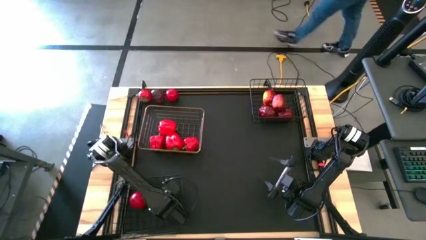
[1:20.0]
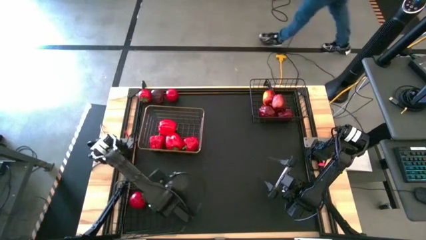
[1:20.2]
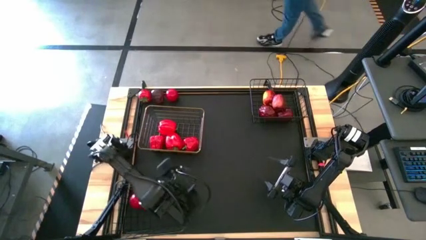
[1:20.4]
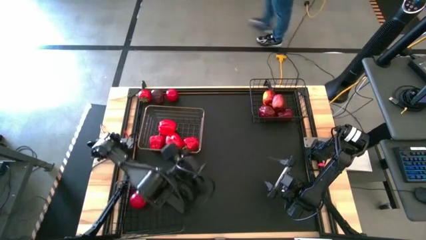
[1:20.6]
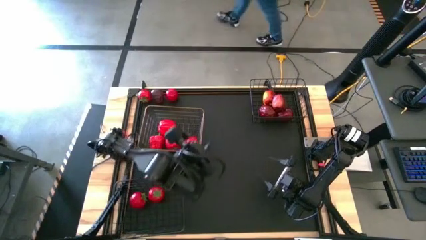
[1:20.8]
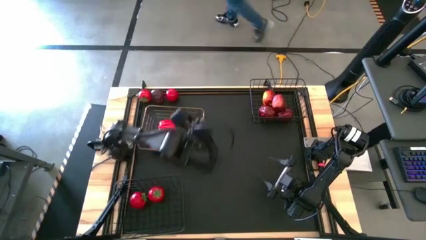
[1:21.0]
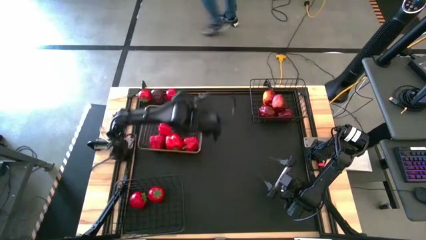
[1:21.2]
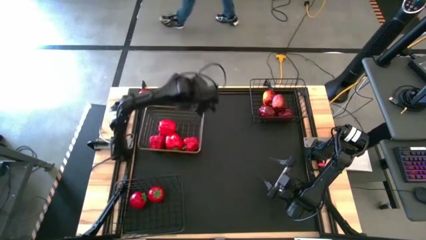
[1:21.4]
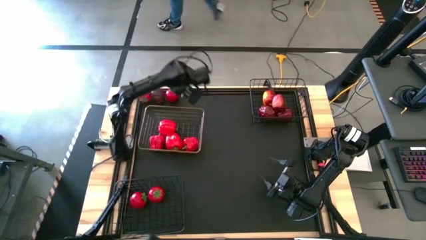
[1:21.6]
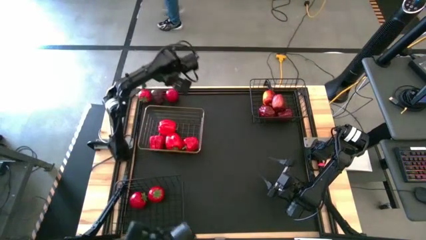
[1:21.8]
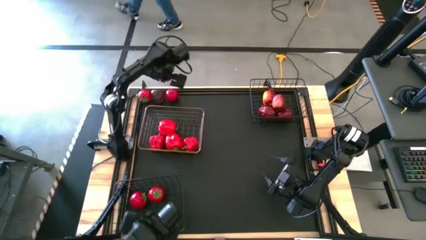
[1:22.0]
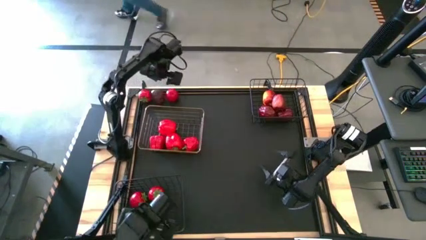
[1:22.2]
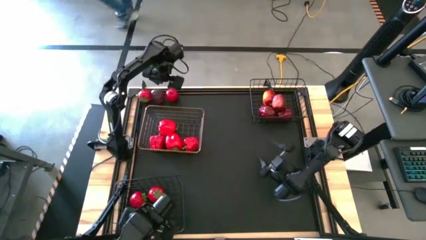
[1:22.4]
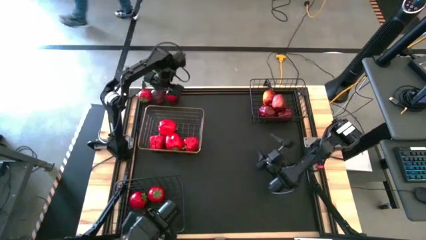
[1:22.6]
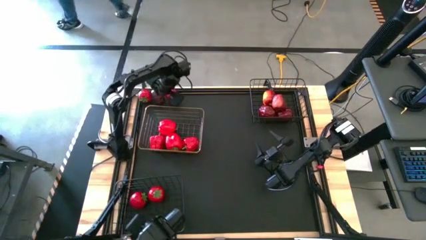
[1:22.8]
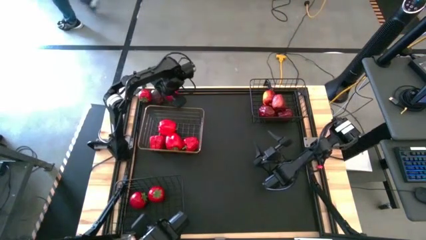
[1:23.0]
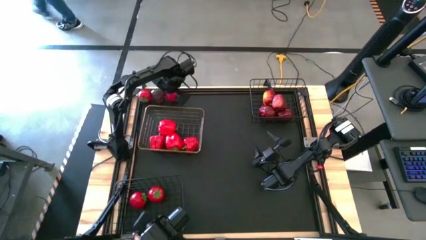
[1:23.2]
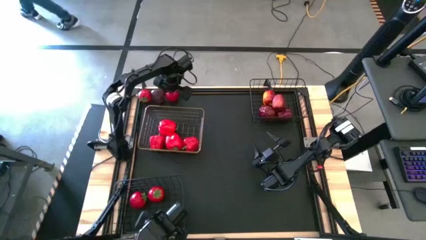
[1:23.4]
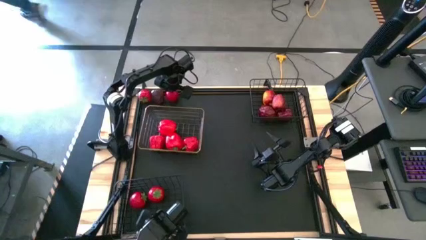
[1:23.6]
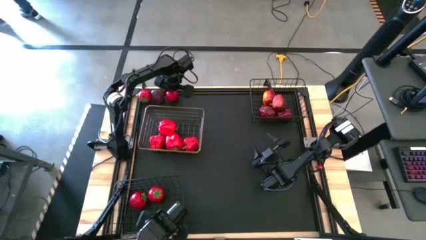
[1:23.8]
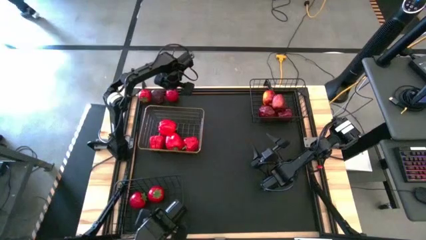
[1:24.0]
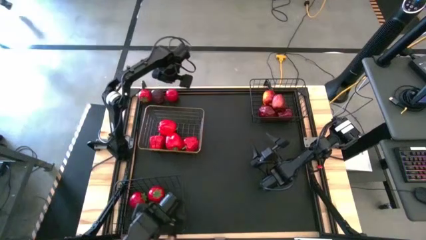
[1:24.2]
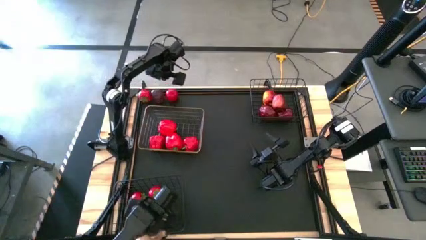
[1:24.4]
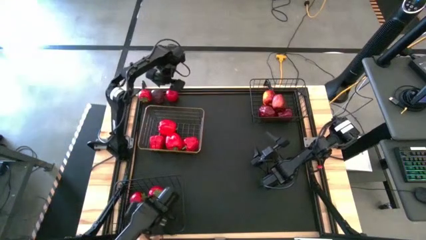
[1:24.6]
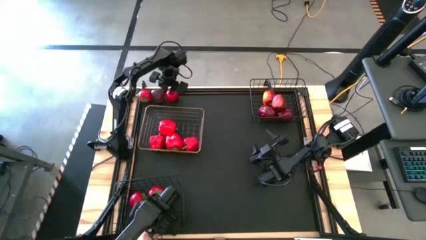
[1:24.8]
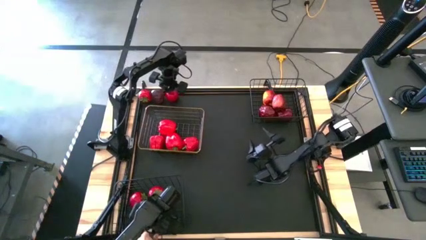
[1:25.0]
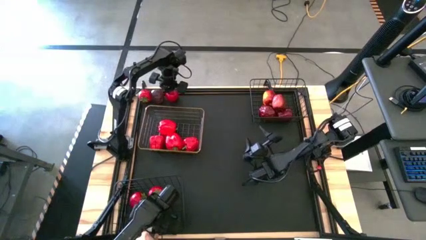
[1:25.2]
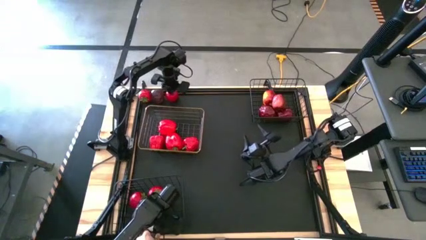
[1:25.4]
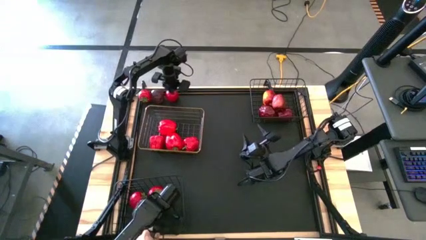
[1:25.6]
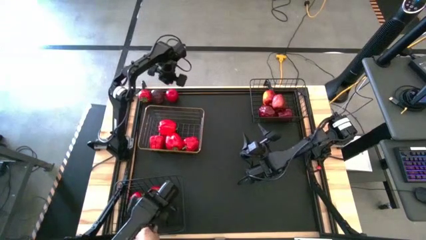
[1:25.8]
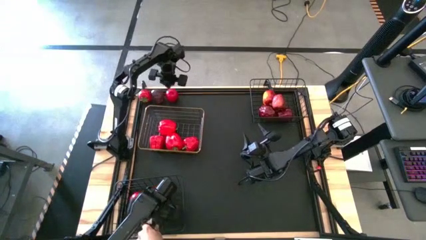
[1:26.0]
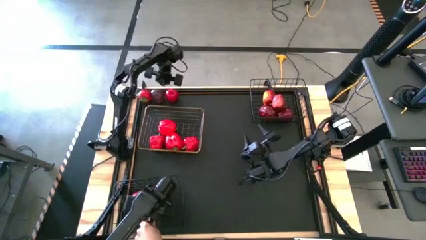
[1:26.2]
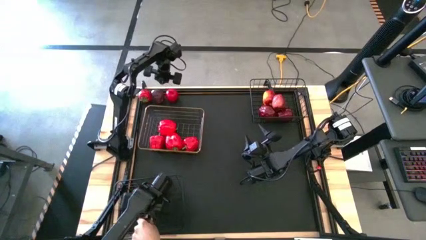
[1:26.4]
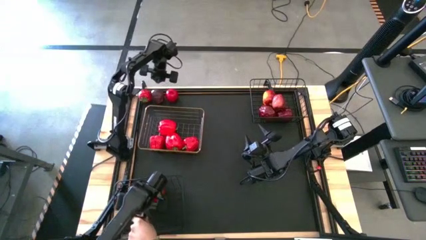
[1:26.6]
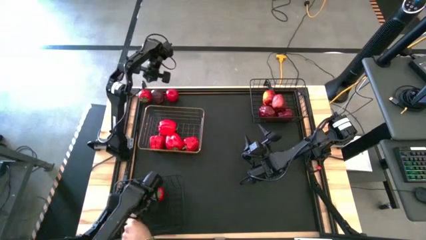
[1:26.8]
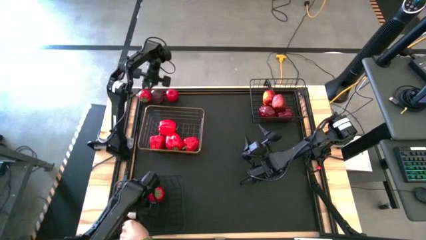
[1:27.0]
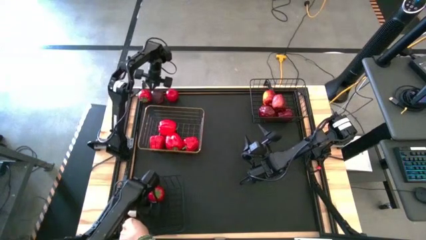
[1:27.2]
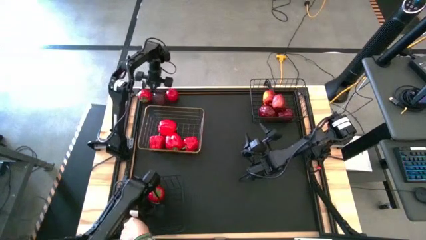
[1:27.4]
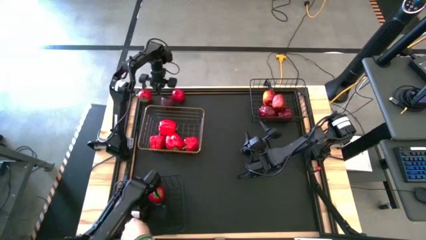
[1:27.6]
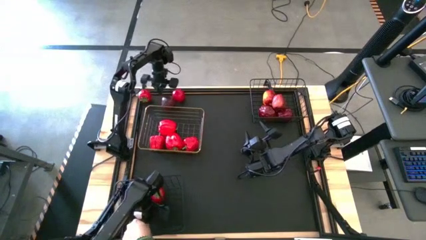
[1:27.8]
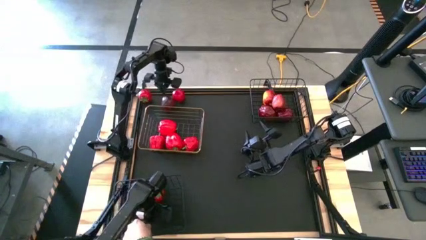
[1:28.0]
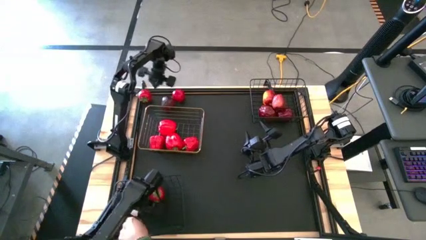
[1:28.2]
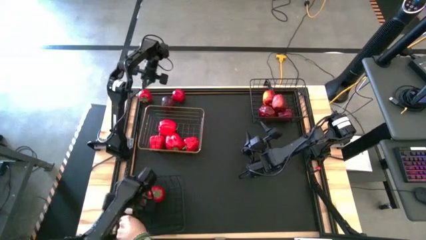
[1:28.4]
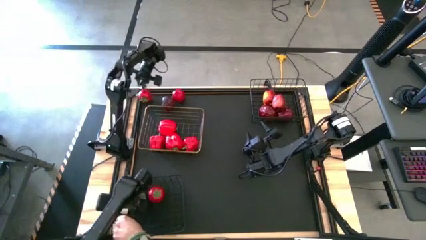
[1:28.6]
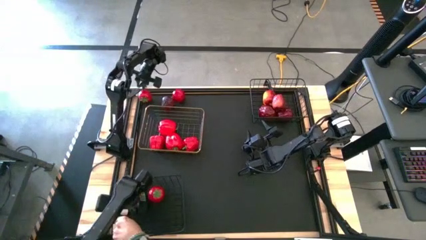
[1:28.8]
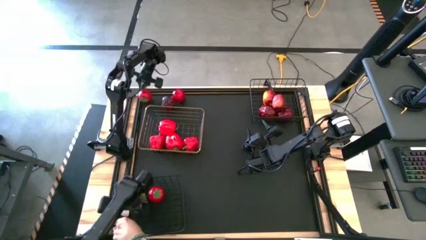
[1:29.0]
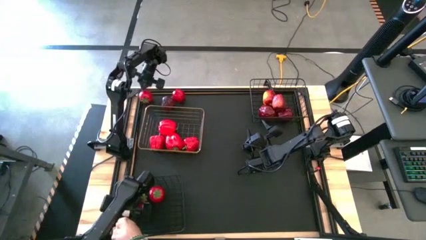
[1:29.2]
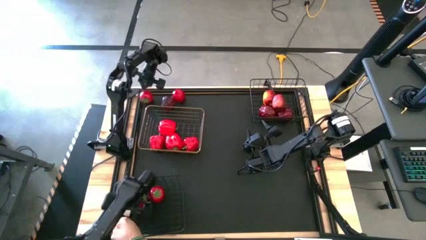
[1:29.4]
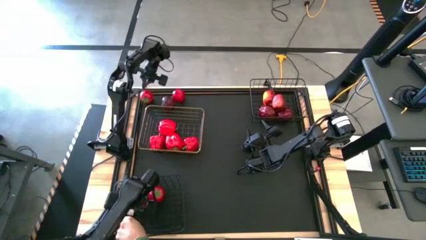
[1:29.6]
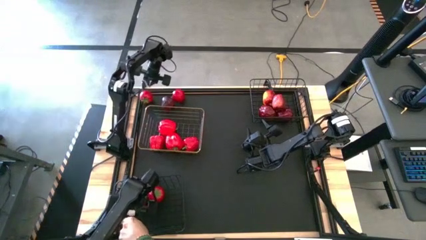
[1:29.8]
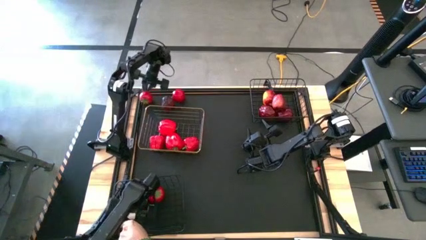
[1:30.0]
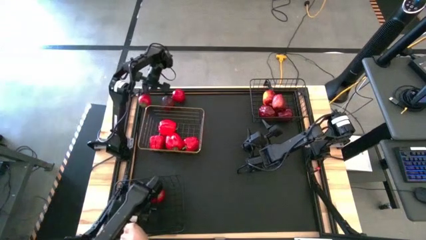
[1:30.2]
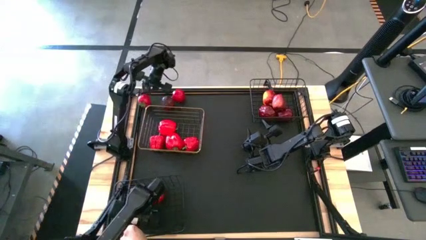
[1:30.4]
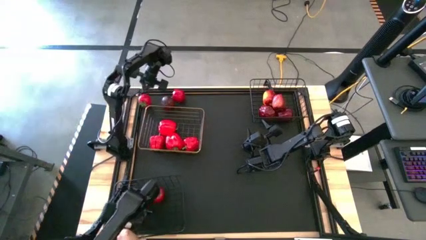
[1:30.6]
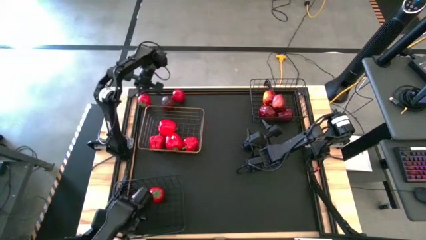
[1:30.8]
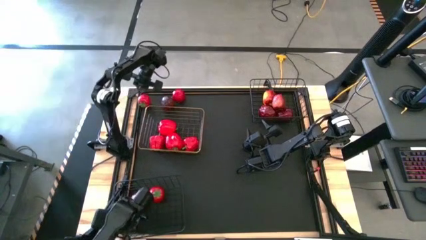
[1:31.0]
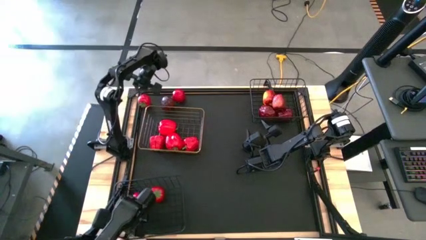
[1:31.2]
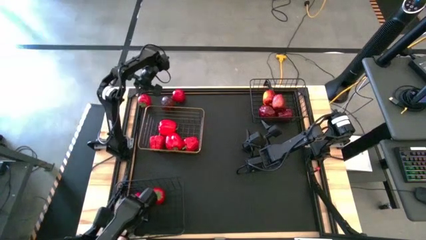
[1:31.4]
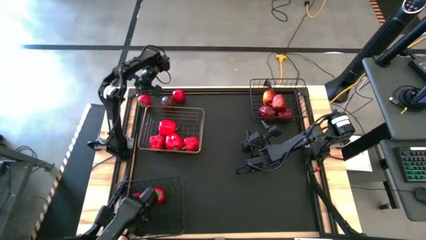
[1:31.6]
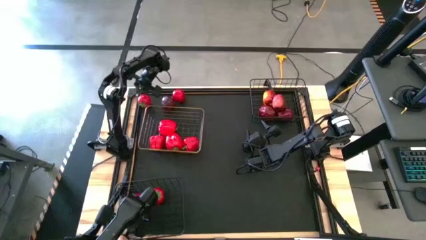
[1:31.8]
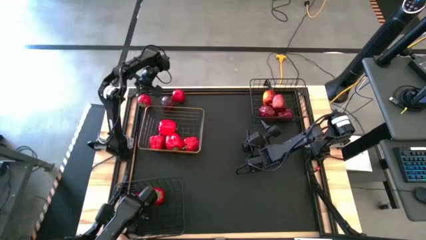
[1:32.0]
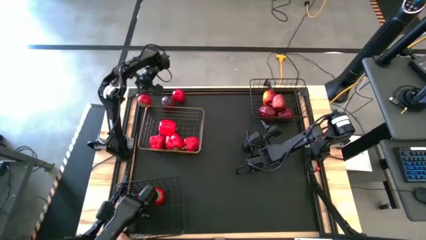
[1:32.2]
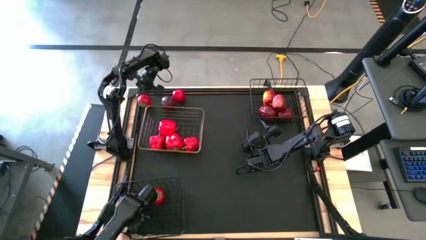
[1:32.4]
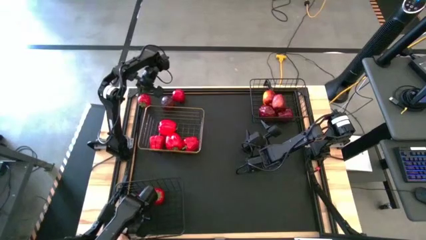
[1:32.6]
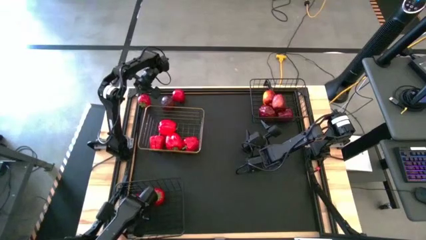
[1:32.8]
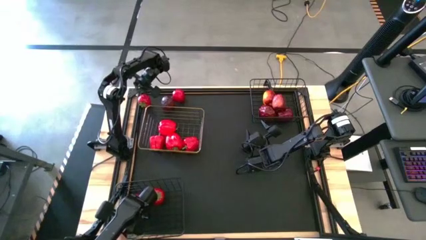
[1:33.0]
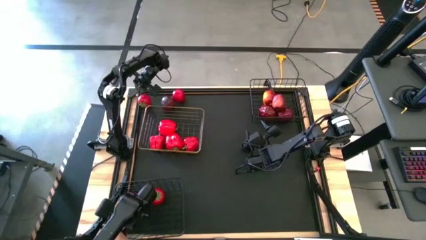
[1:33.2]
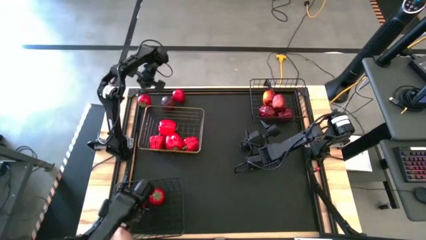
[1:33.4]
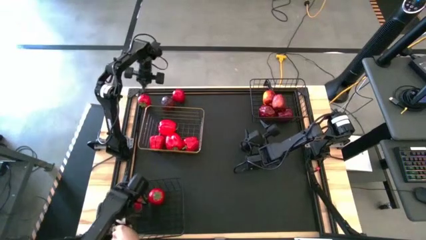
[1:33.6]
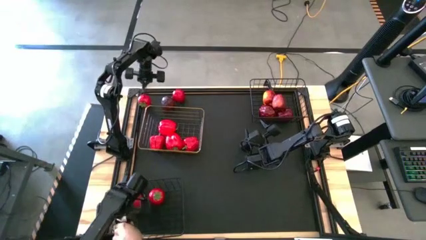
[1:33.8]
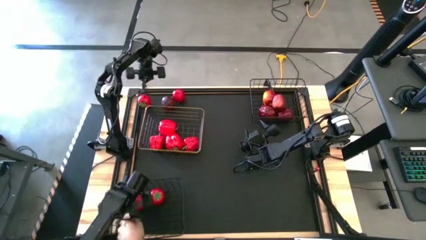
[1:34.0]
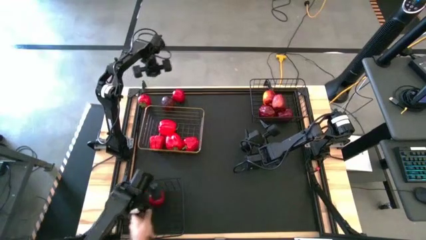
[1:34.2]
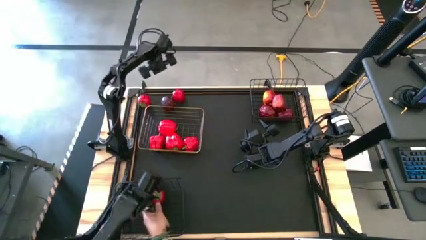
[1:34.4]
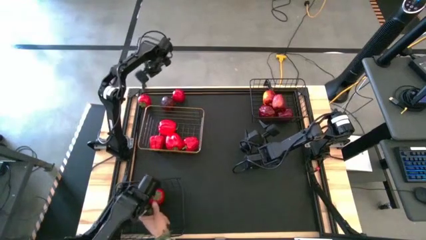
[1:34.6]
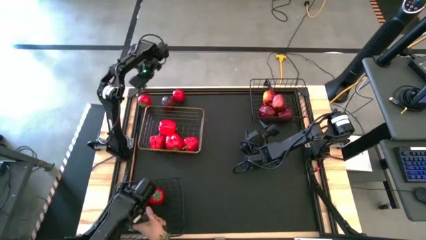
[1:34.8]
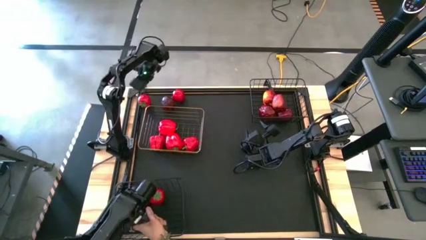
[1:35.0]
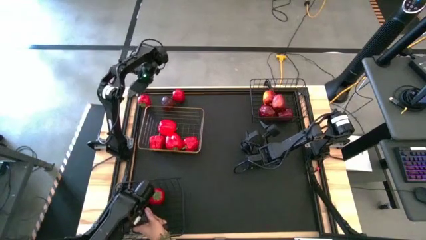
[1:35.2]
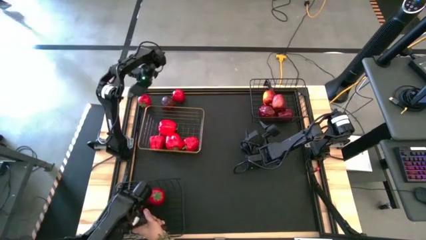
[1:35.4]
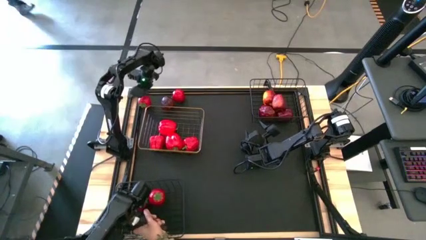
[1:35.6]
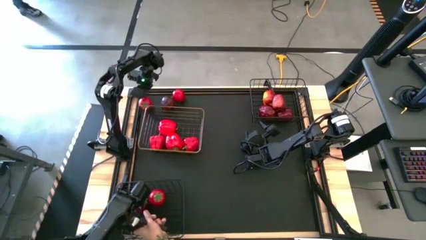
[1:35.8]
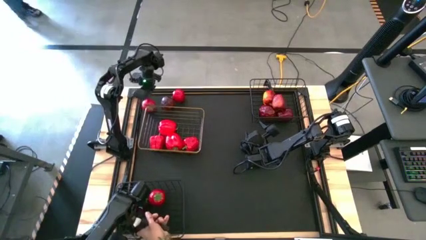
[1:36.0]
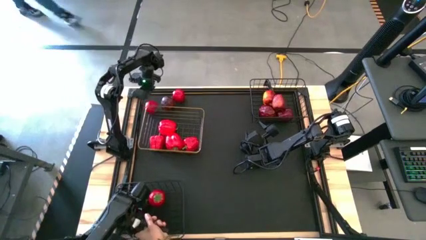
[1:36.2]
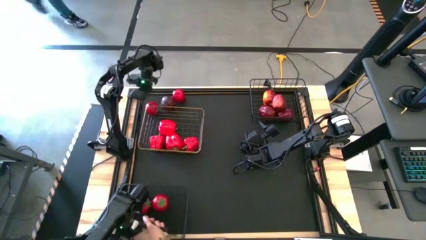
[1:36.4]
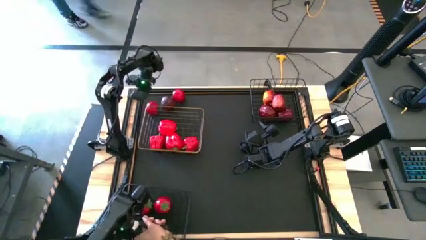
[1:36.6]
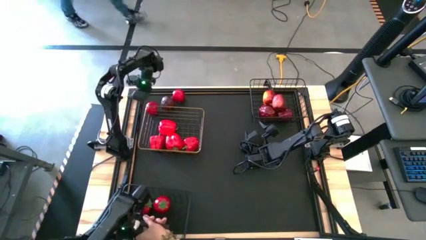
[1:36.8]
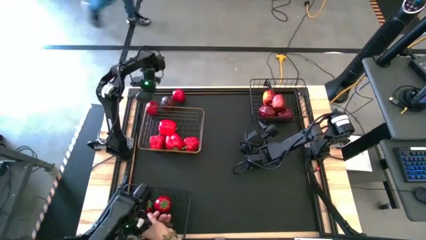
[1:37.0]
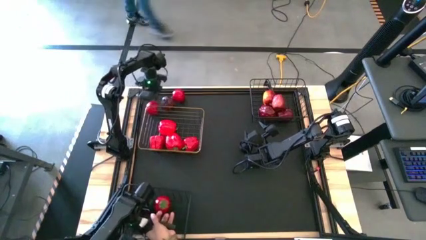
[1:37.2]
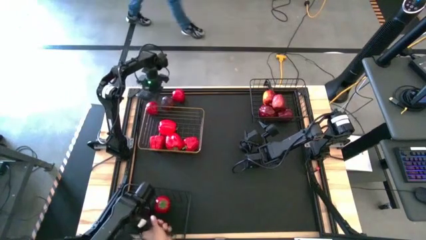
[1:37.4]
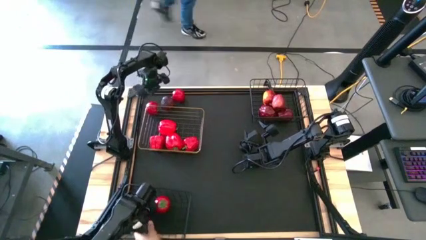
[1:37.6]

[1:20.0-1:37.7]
Task: Sort produce into baskets
Move the tomato from the top left to the top center of the table
